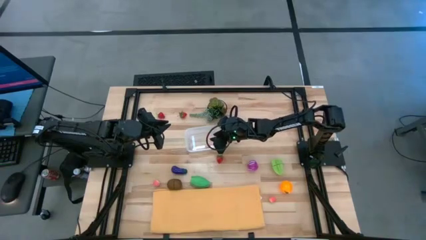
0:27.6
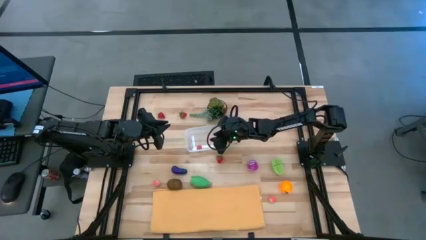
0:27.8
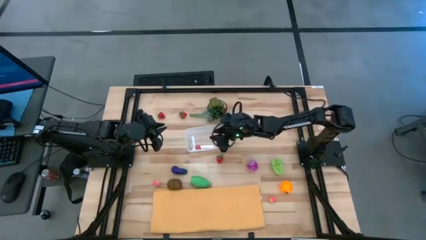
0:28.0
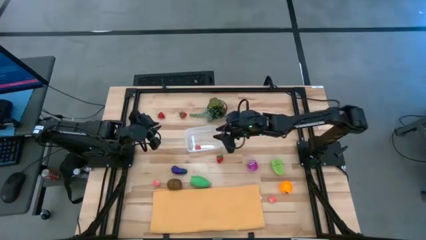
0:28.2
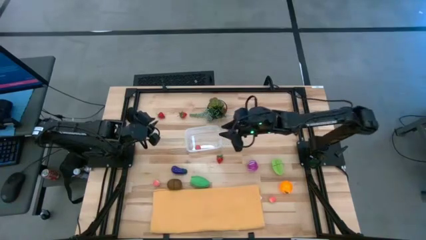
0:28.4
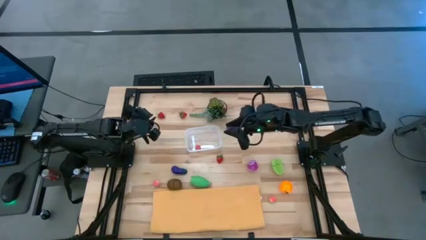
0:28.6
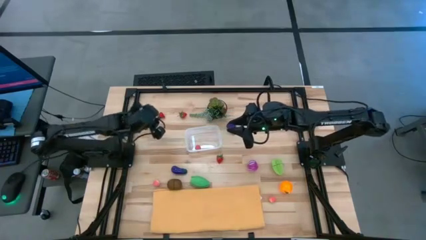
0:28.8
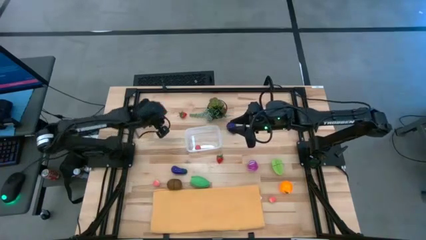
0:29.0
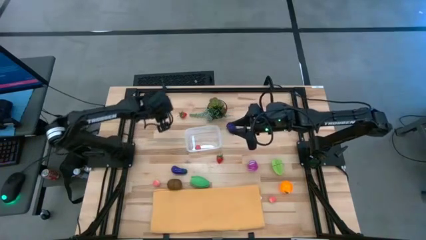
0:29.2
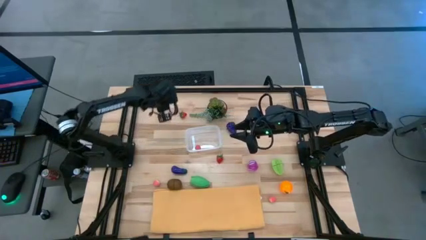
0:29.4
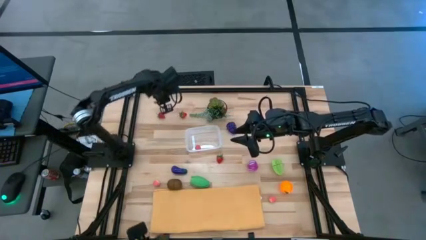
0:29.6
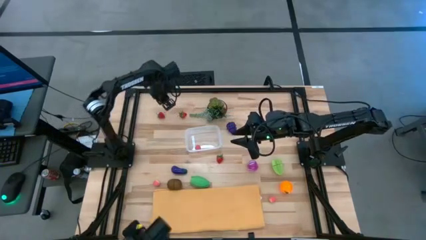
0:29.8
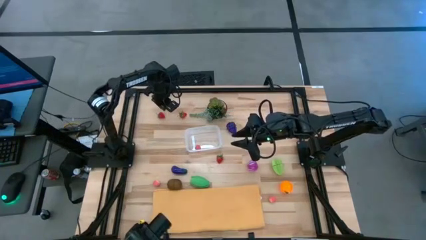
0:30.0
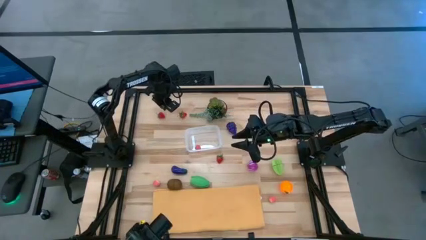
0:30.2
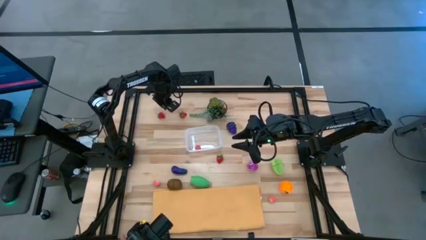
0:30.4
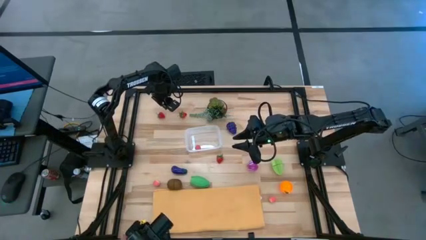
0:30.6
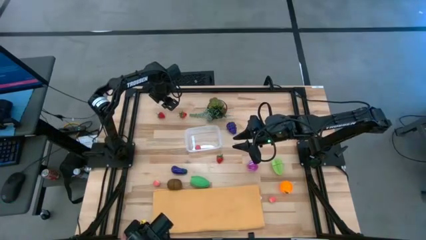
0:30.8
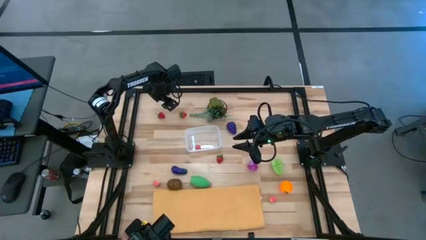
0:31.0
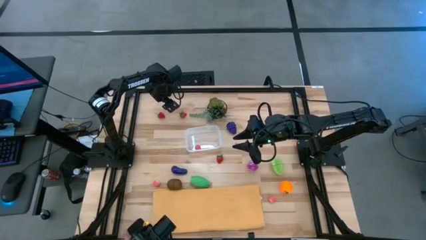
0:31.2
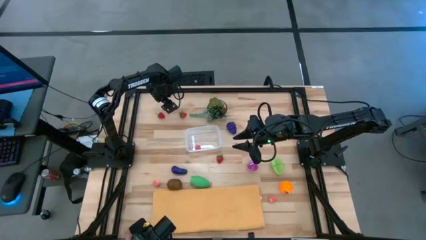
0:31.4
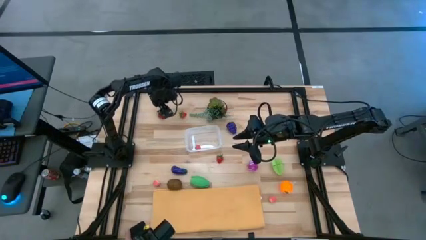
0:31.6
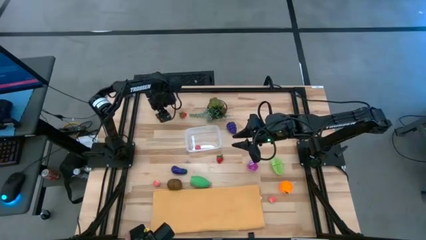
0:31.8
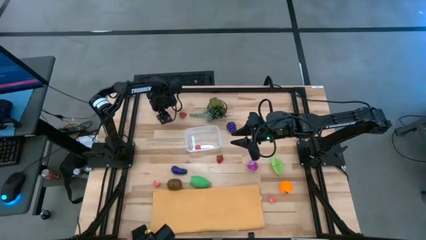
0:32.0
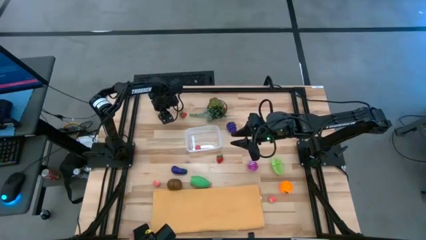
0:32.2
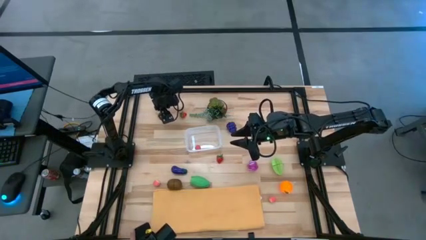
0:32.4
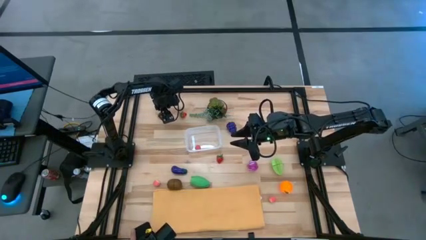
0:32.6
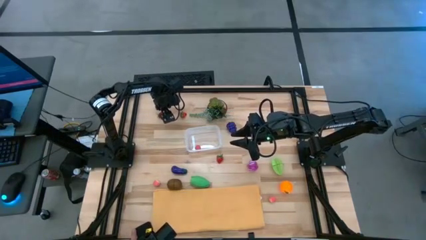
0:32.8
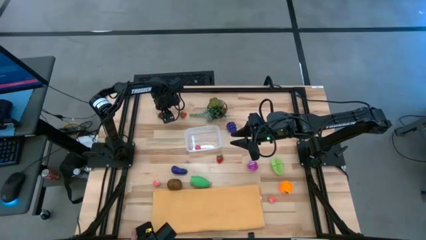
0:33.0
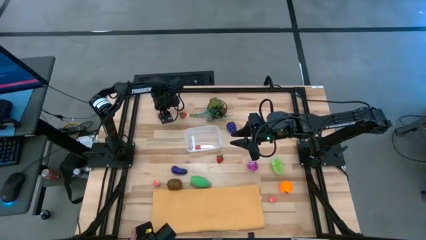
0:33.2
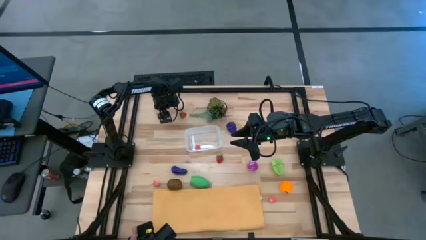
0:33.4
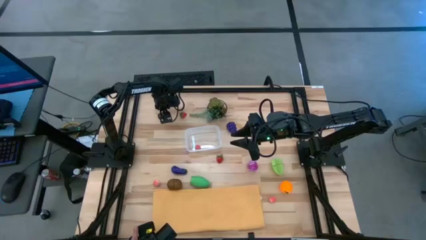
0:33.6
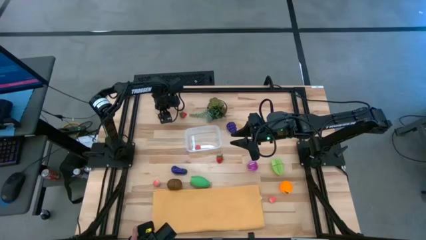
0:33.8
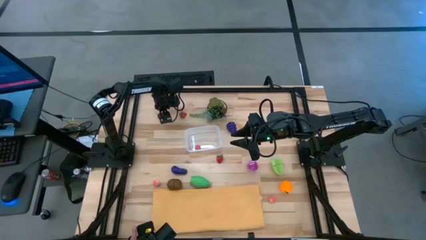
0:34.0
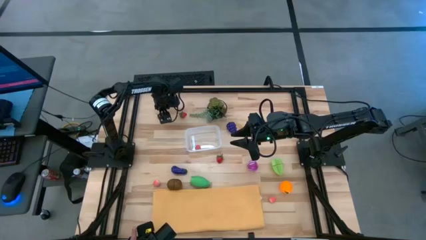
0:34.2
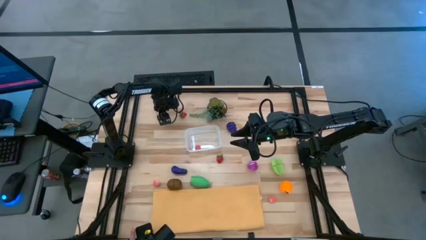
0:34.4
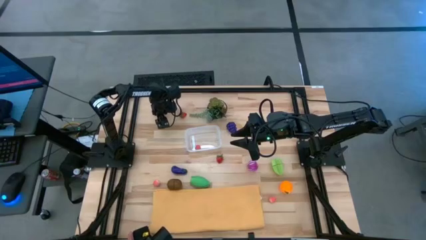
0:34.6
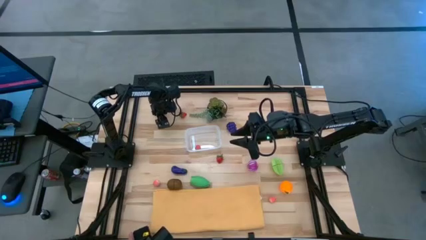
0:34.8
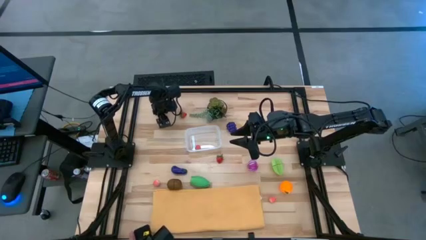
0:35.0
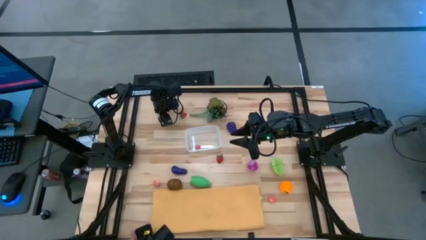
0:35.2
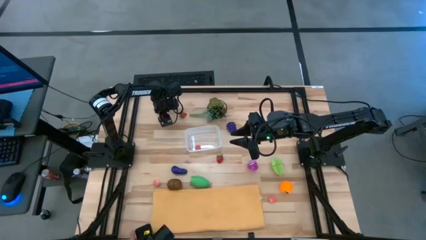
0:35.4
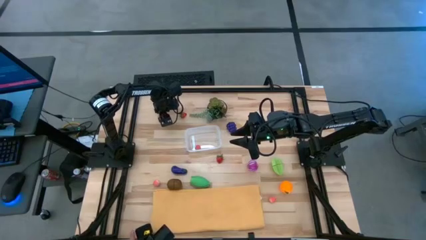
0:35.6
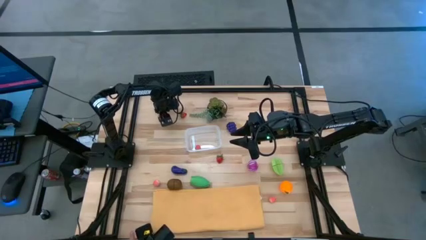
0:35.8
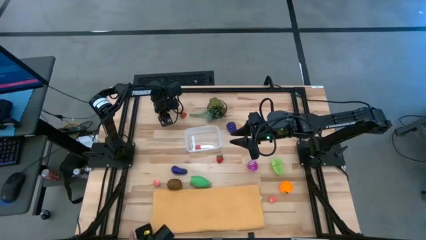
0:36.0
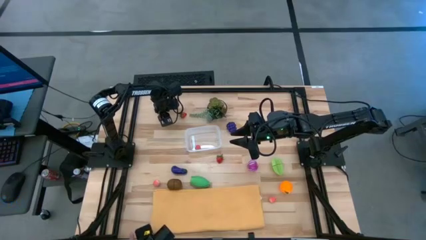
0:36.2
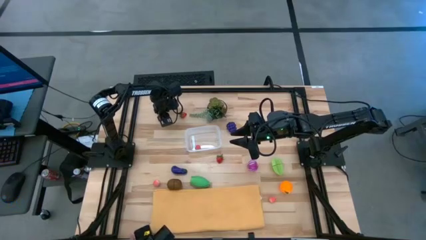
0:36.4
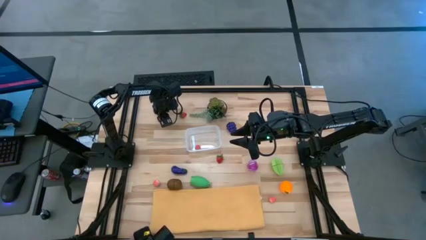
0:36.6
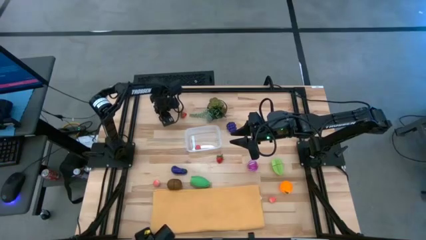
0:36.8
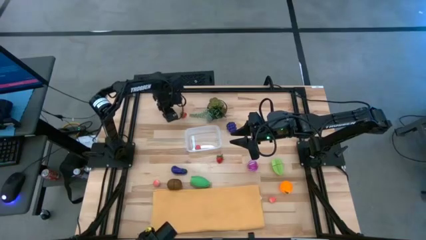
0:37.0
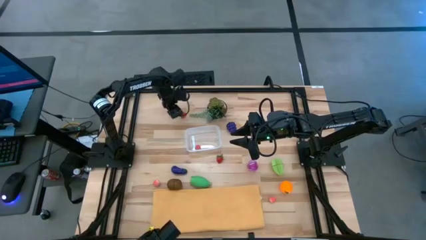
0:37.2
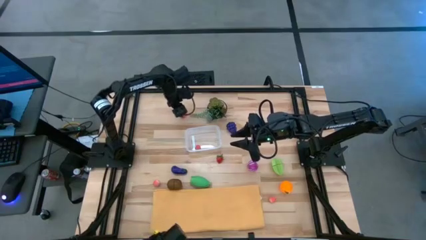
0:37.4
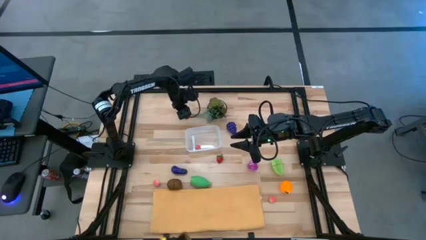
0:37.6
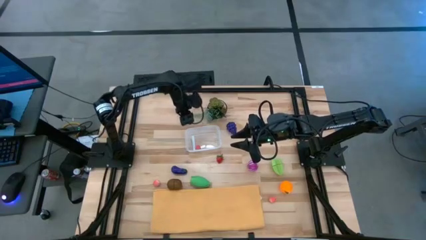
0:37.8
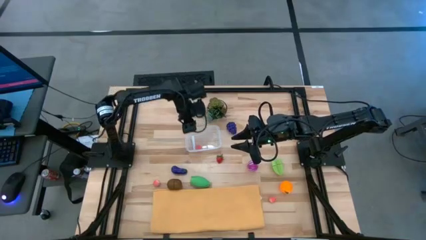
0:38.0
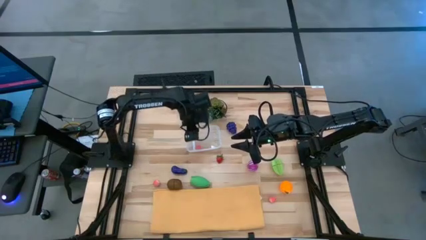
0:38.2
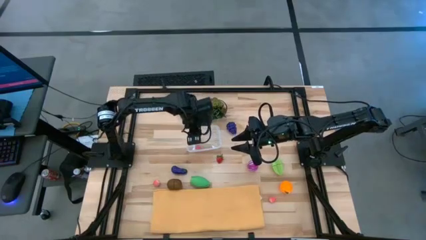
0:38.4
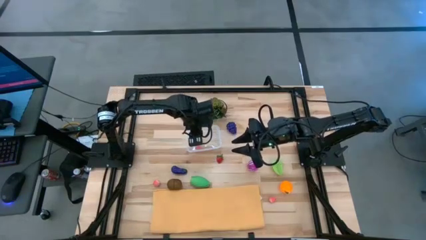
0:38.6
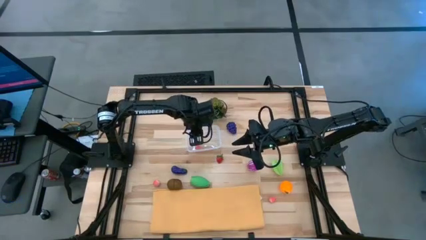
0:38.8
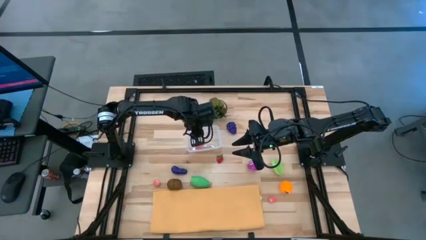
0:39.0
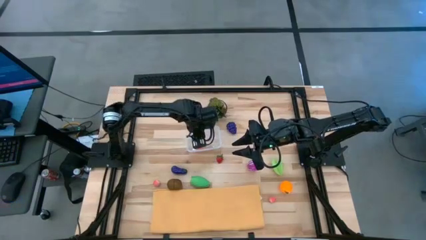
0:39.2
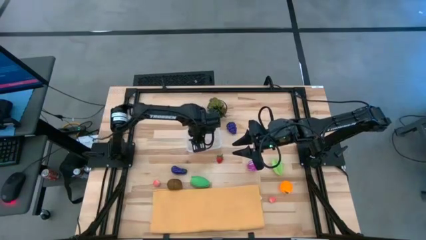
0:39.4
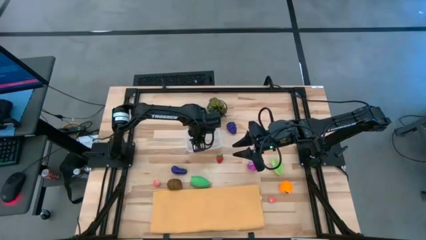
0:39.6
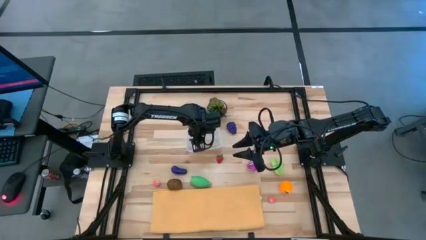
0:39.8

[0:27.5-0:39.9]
Task: Pick and placing Produce into tupperware
Put the top left red strawberry into the transparent bin

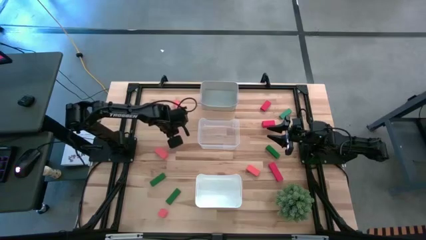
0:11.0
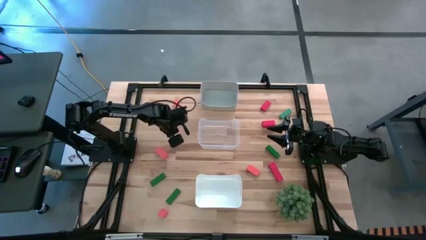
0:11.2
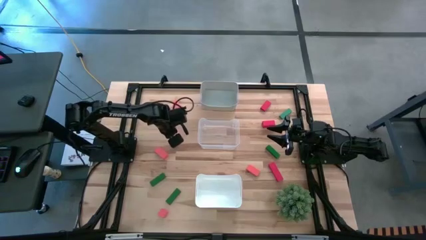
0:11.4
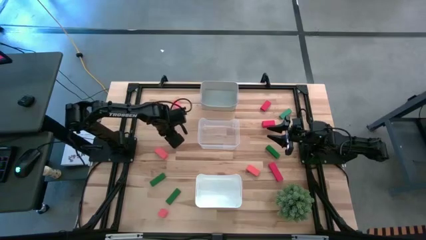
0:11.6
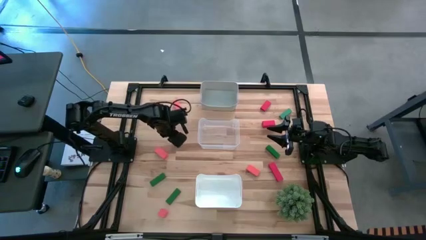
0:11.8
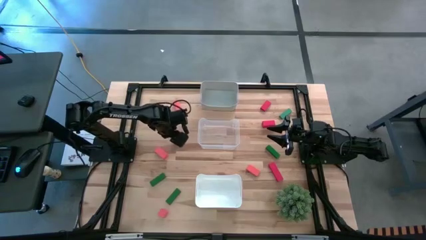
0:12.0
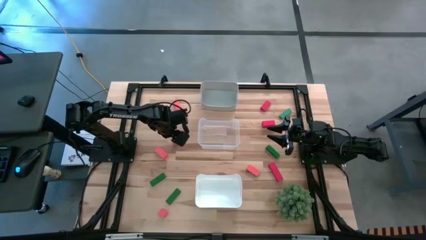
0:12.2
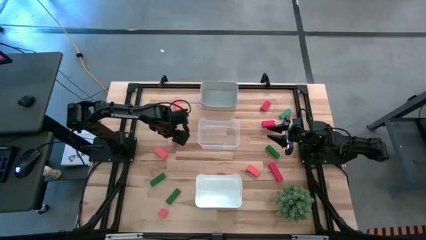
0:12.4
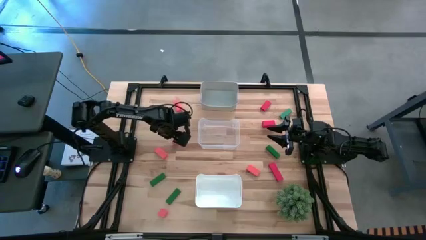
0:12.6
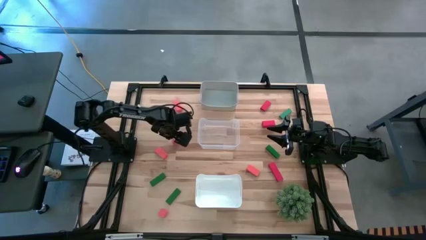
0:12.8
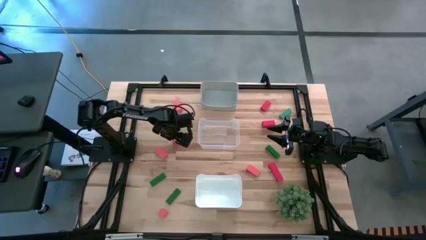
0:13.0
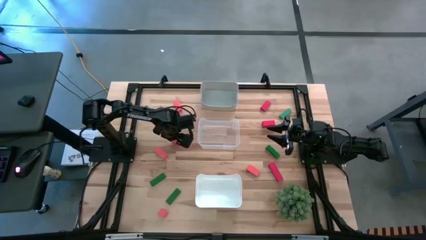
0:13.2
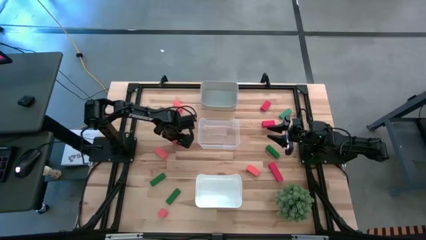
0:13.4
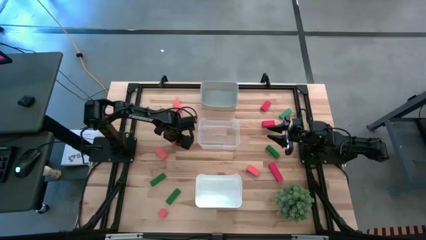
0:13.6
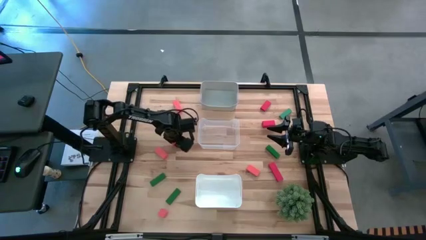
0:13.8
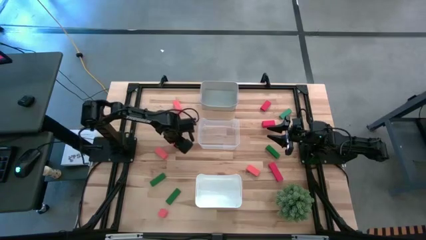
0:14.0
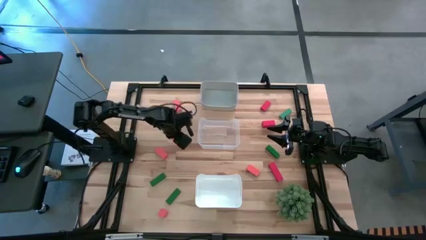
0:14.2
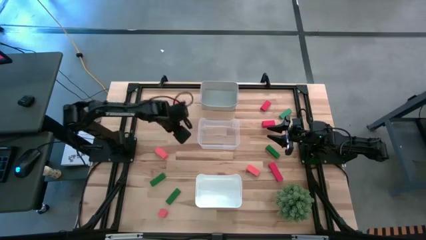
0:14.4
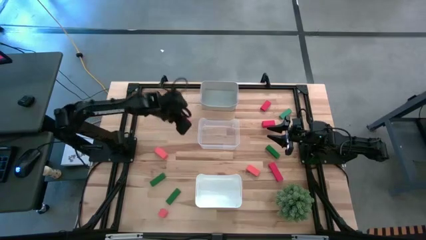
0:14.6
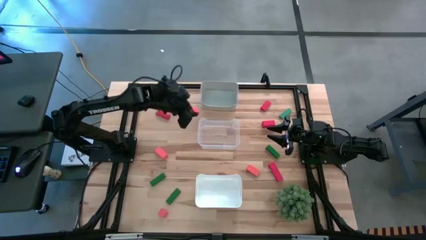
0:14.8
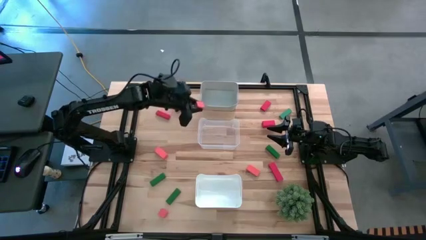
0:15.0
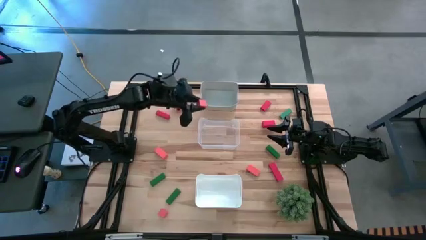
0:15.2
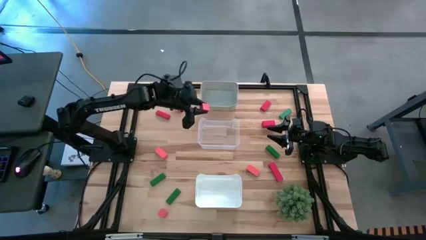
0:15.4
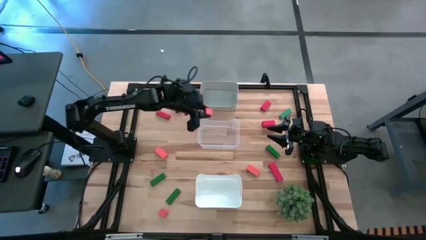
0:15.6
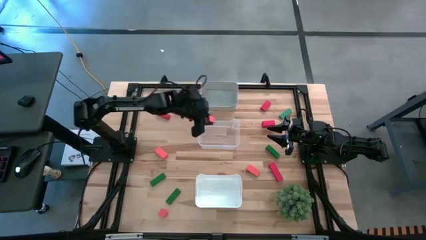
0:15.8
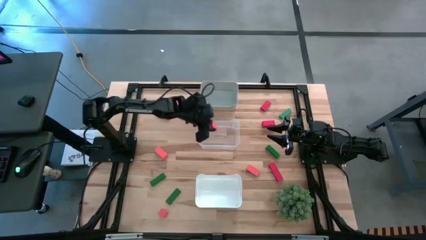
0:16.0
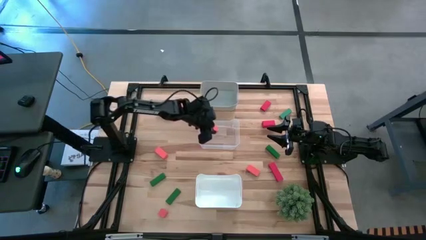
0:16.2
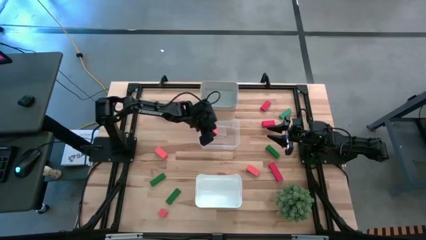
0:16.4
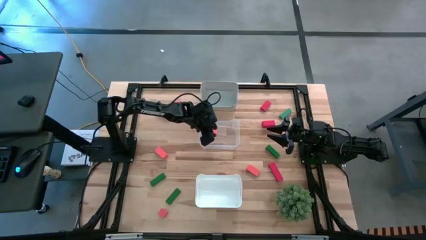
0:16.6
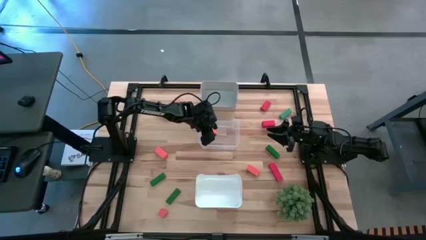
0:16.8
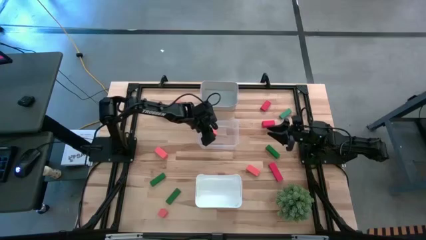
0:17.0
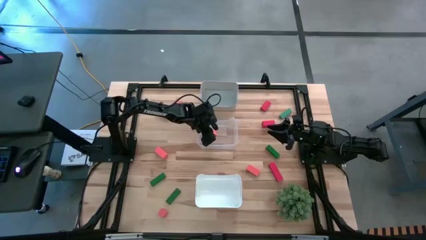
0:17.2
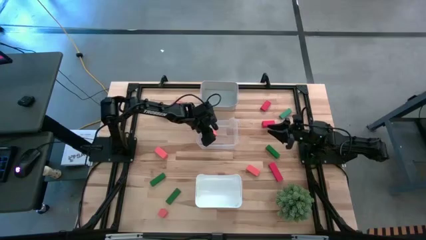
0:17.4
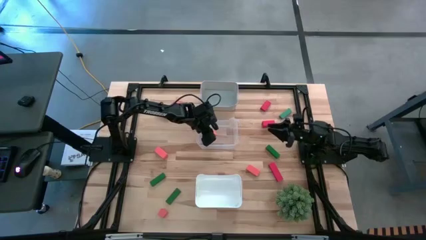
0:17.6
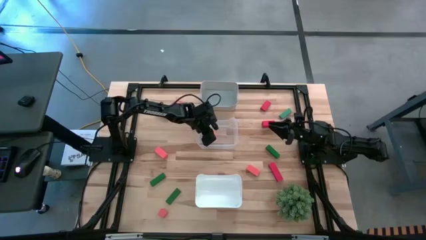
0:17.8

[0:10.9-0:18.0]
Task: Sort & place blocks by color
Put the orange block into the transparent bin
